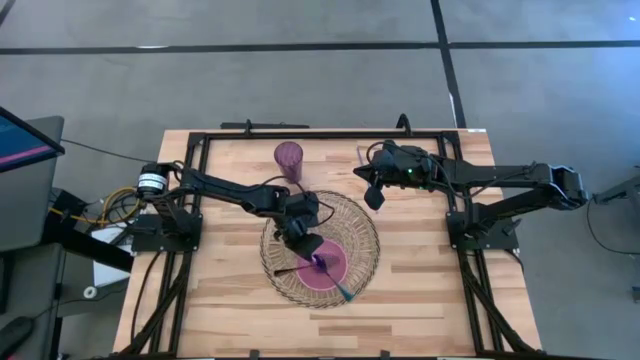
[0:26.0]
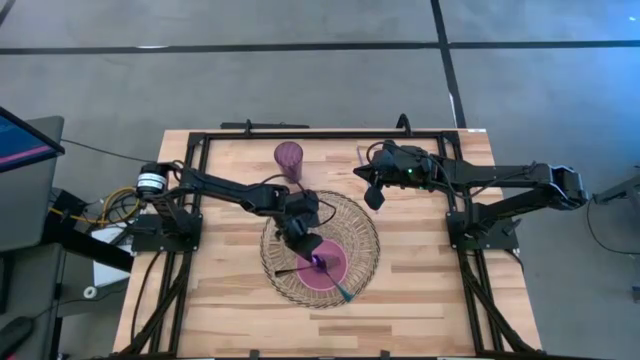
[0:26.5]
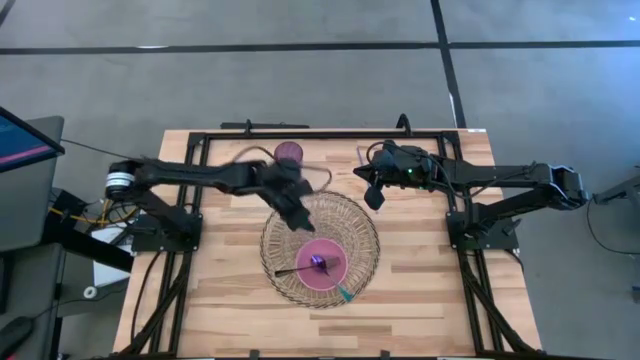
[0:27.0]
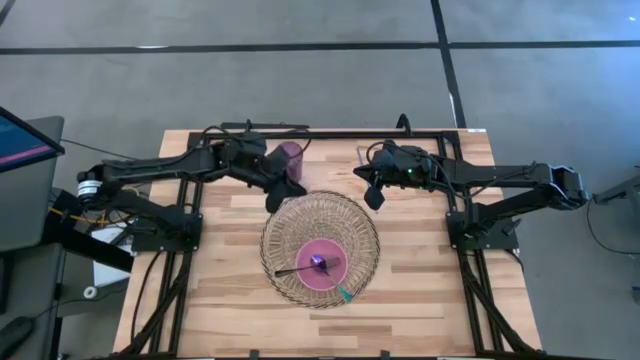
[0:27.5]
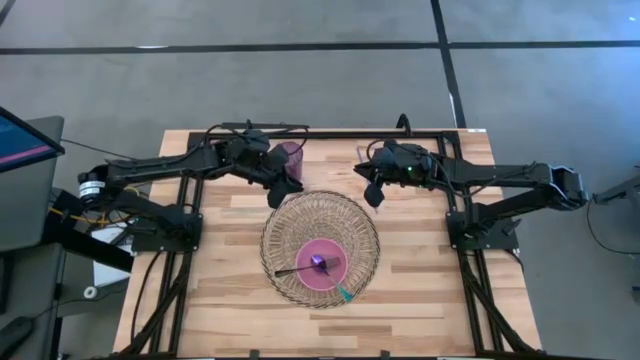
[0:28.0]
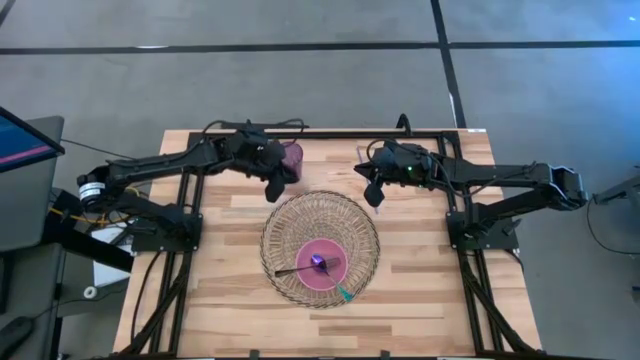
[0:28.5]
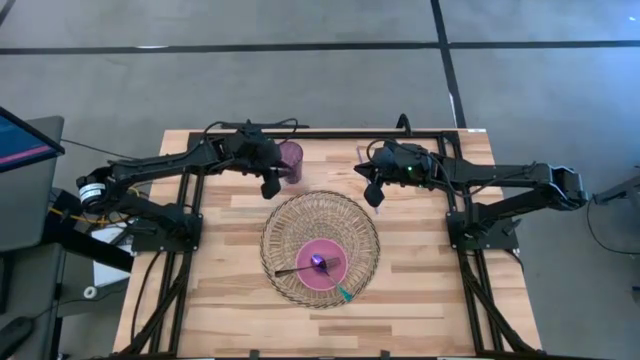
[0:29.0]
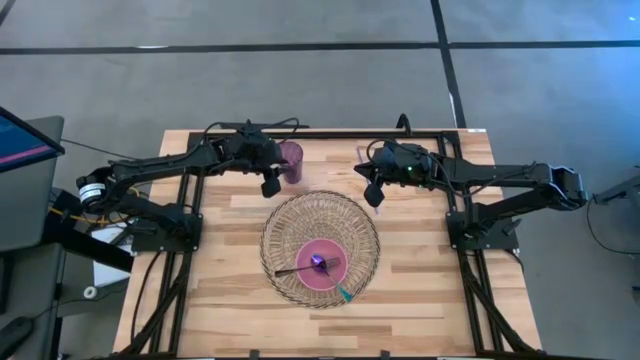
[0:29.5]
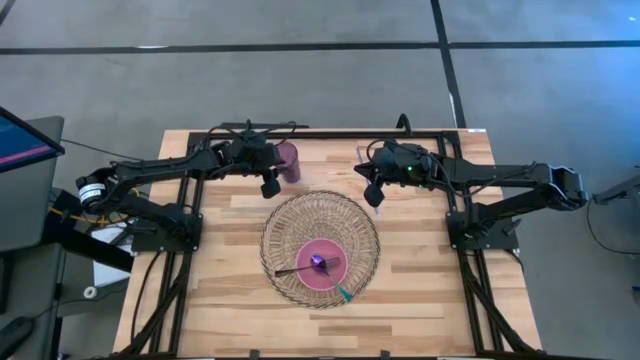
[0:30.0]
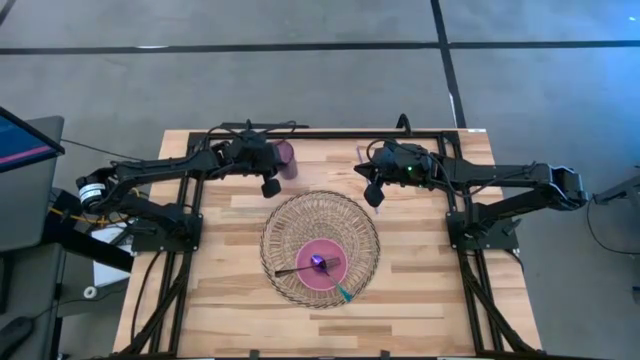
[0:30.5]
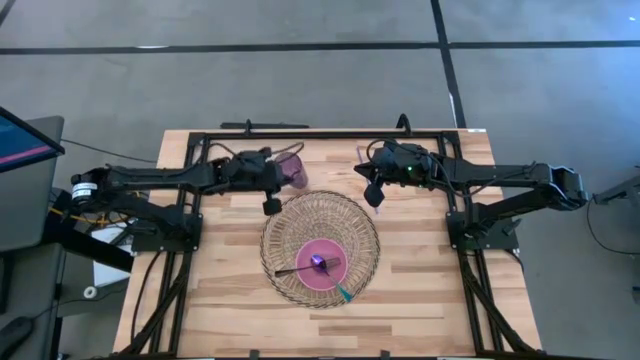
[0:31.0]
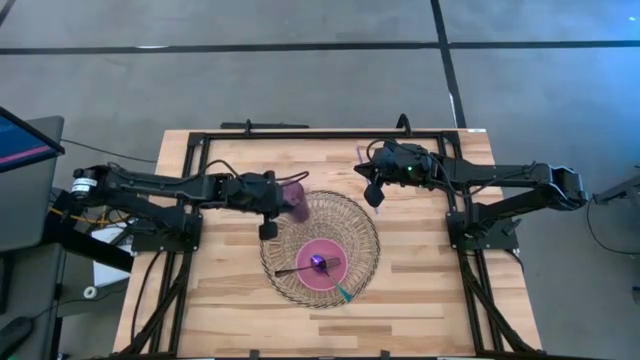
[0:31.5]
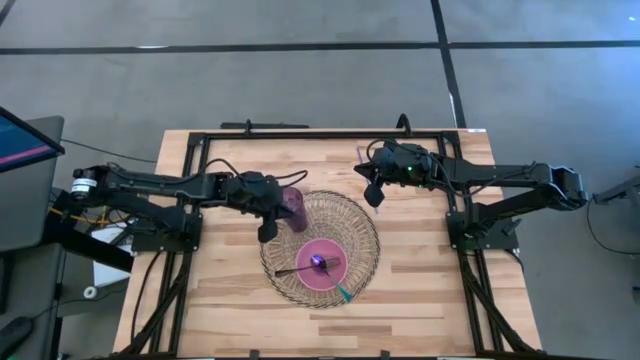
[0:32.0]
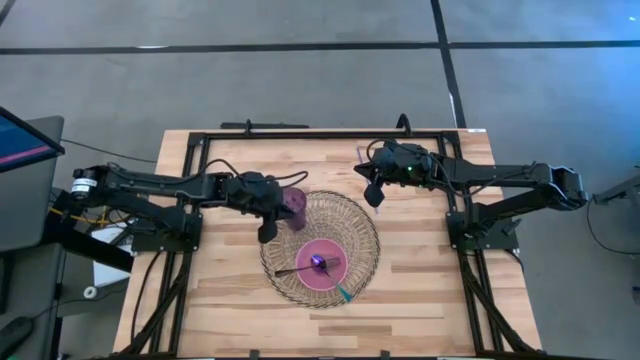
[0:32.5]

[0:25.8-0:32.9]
Task: Pick & Place Utensil
Put the violet cup on the brown mat to the top left of the pink bowl

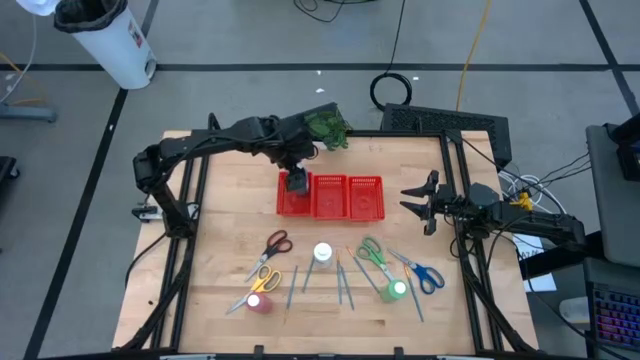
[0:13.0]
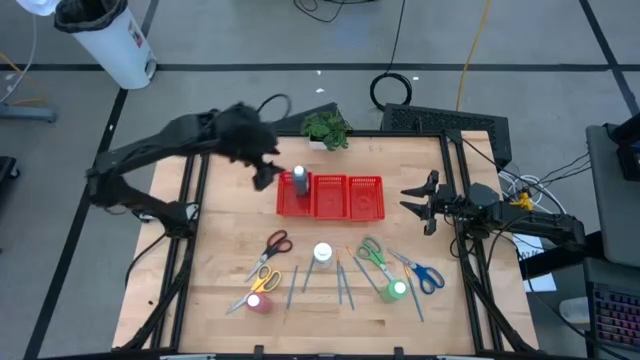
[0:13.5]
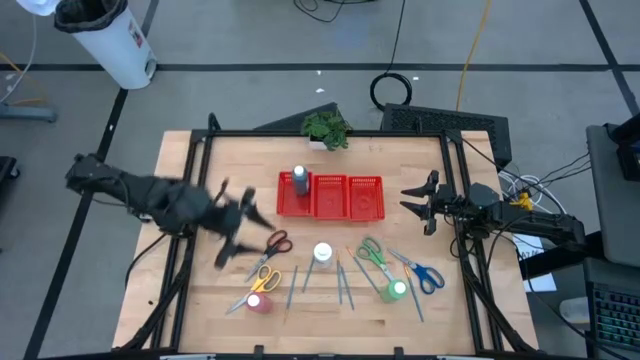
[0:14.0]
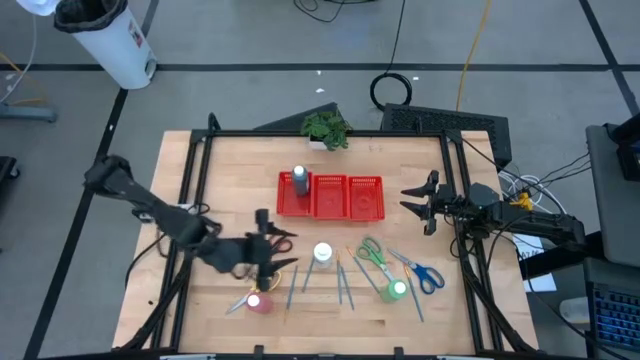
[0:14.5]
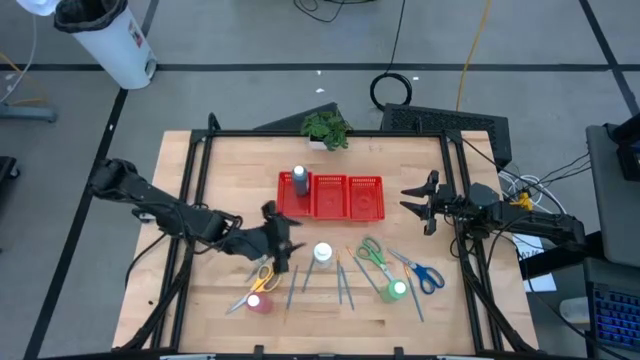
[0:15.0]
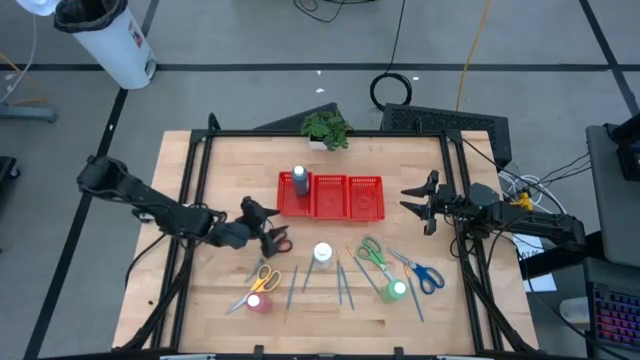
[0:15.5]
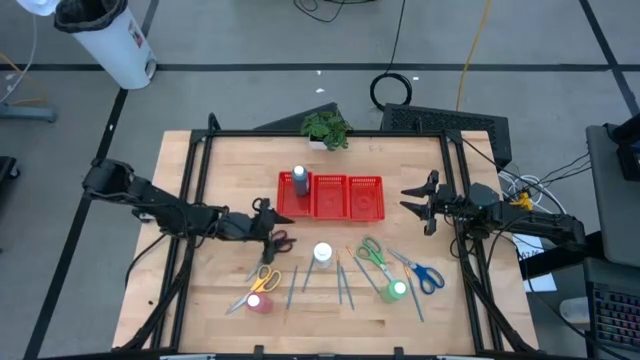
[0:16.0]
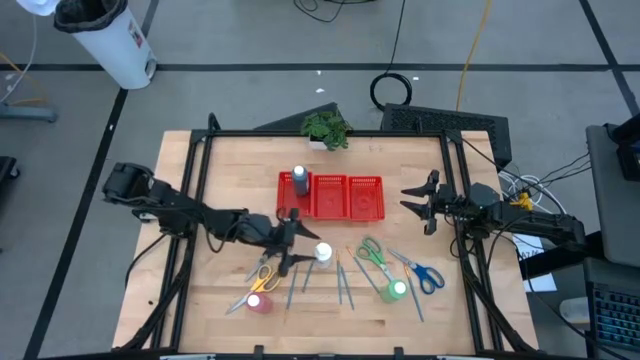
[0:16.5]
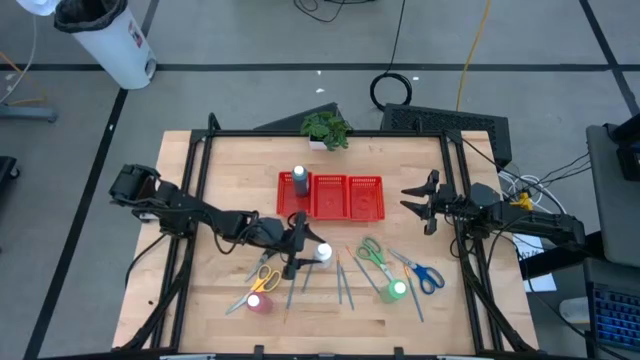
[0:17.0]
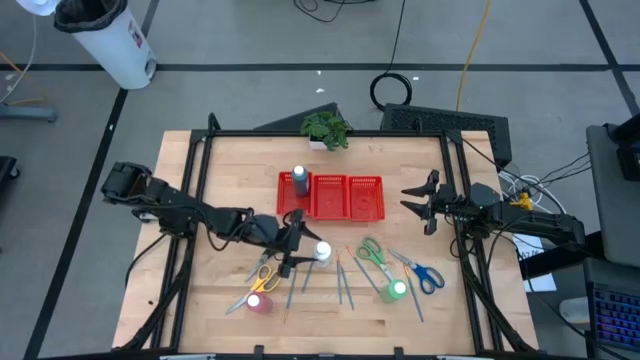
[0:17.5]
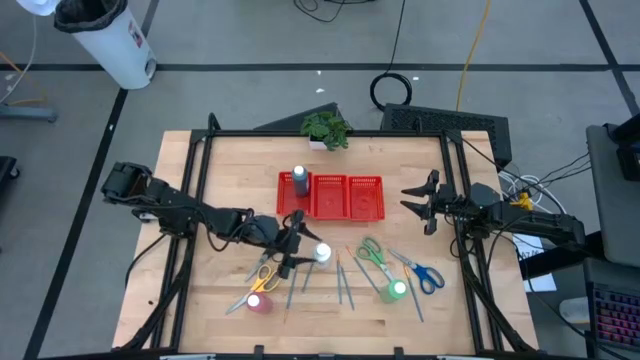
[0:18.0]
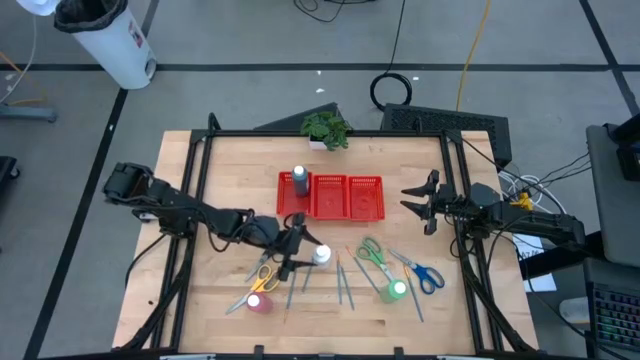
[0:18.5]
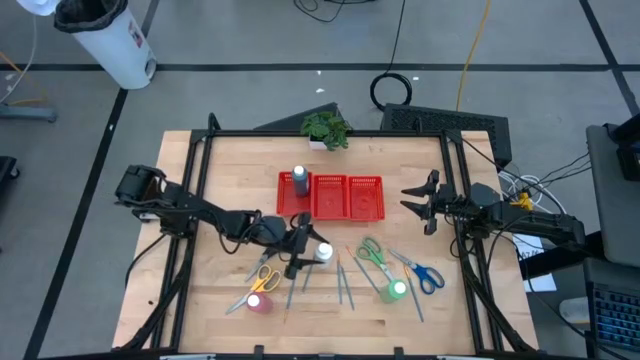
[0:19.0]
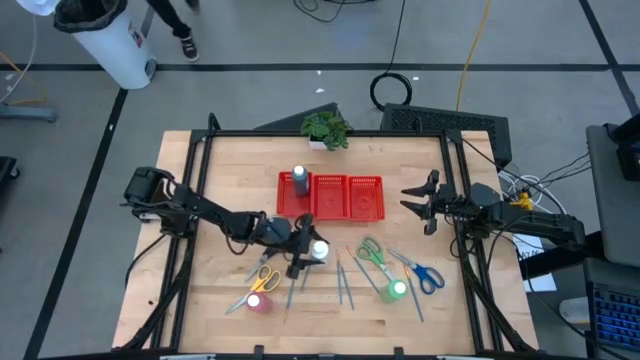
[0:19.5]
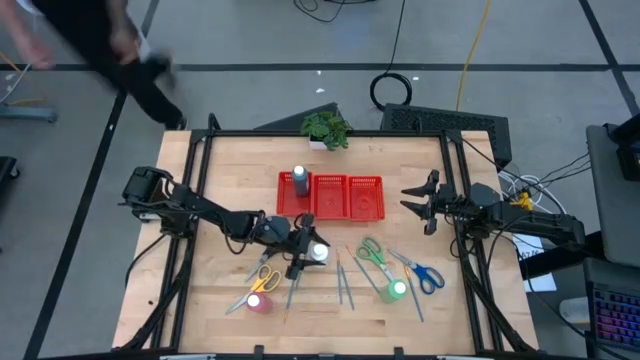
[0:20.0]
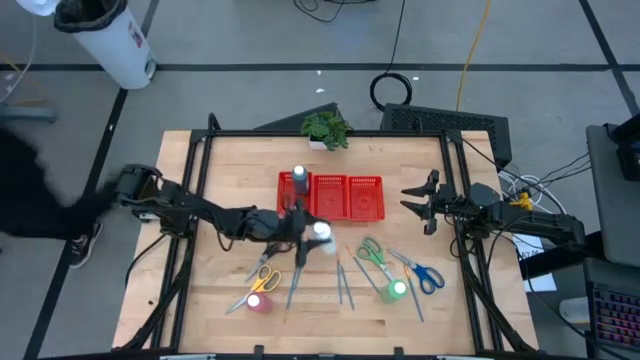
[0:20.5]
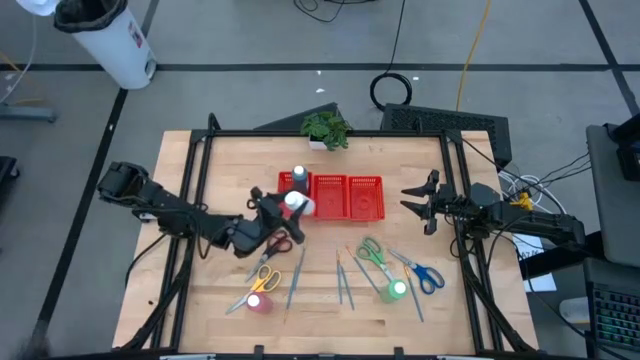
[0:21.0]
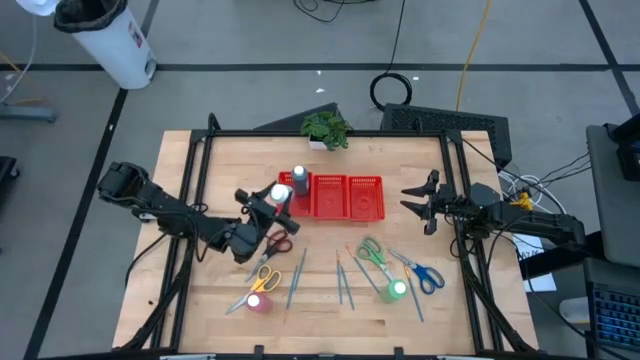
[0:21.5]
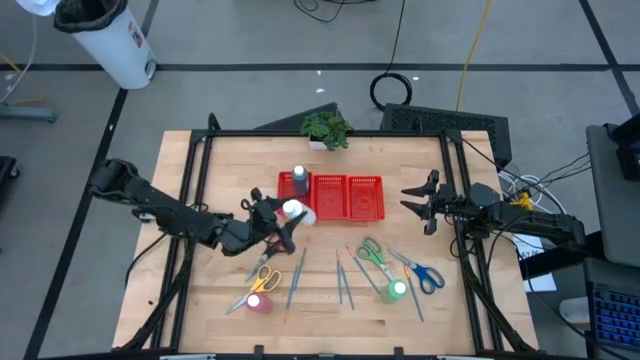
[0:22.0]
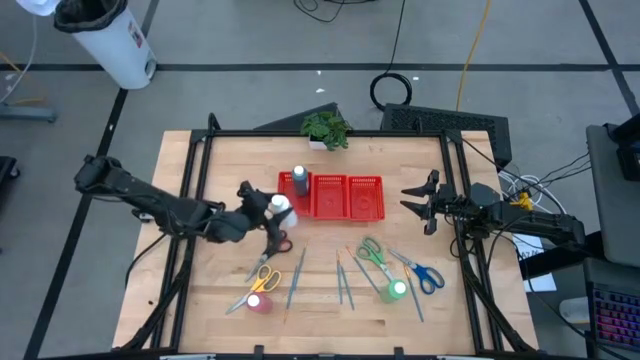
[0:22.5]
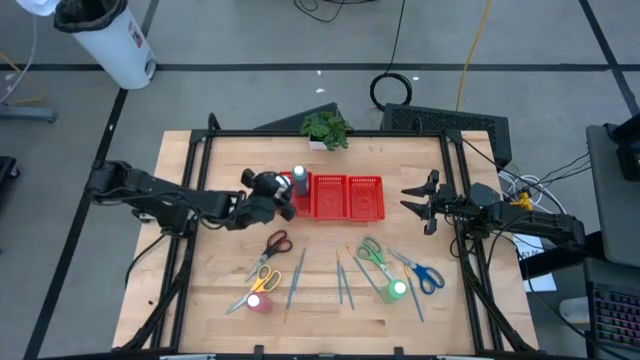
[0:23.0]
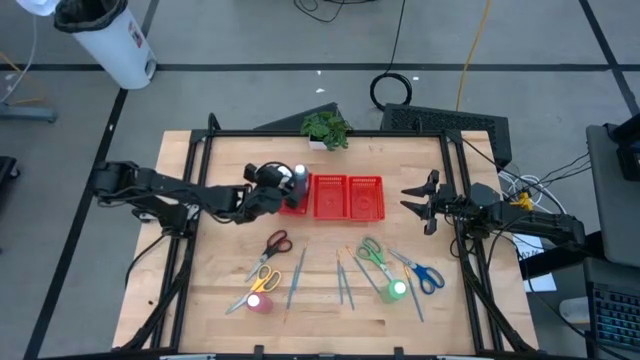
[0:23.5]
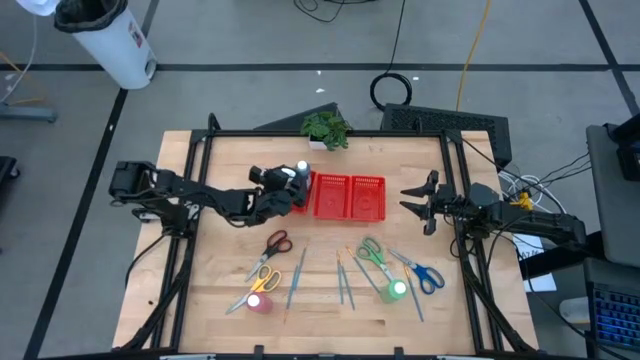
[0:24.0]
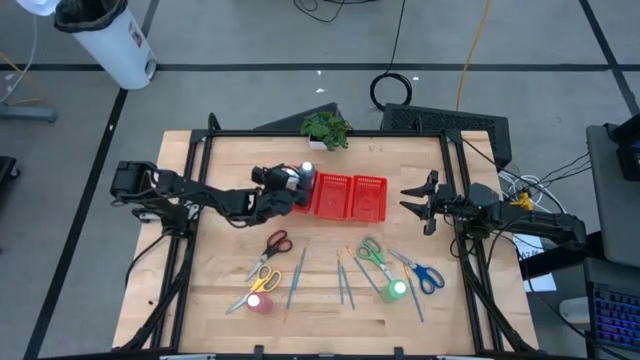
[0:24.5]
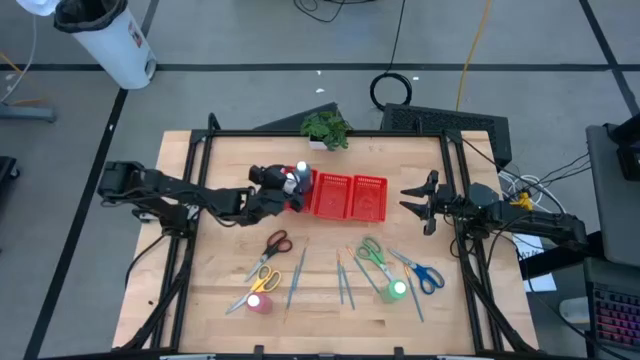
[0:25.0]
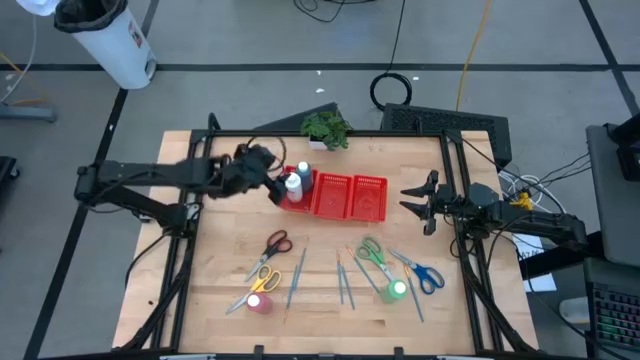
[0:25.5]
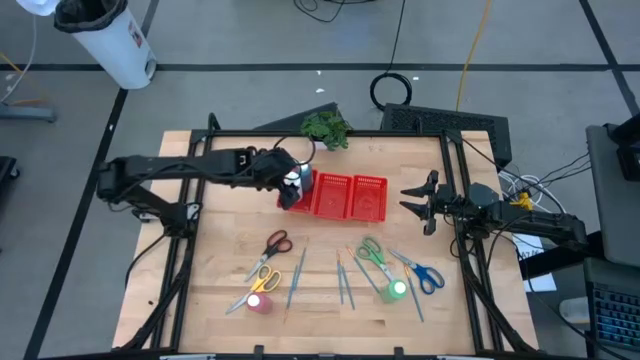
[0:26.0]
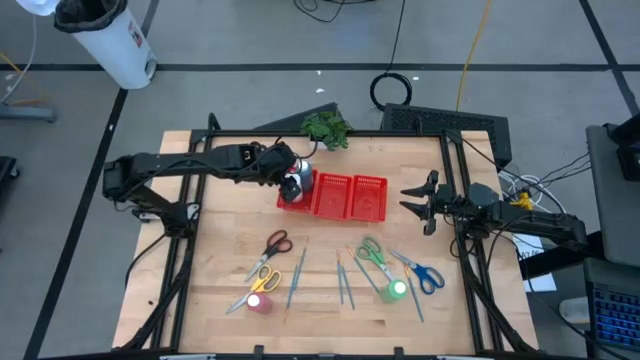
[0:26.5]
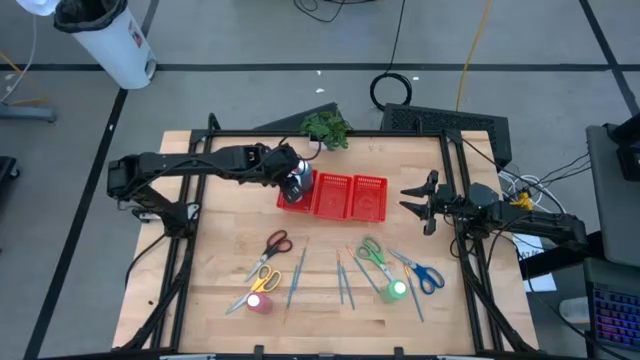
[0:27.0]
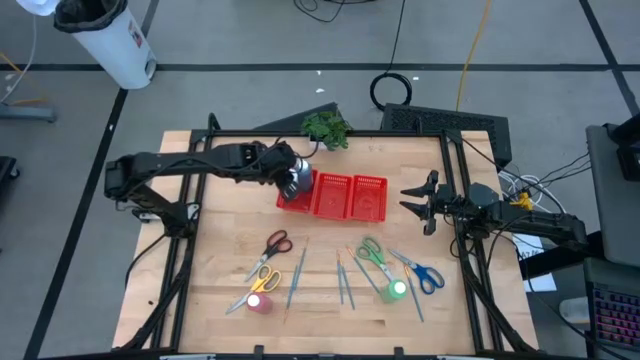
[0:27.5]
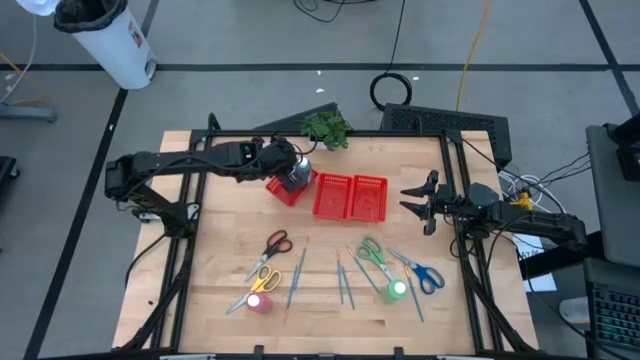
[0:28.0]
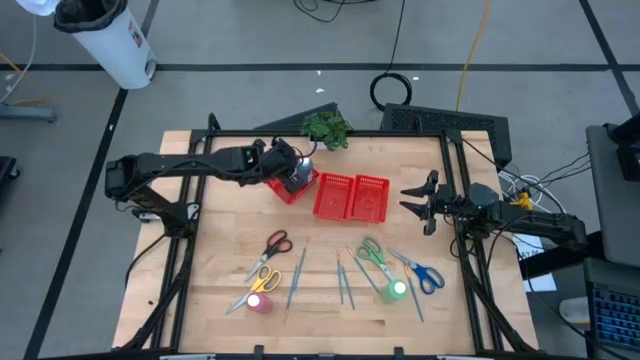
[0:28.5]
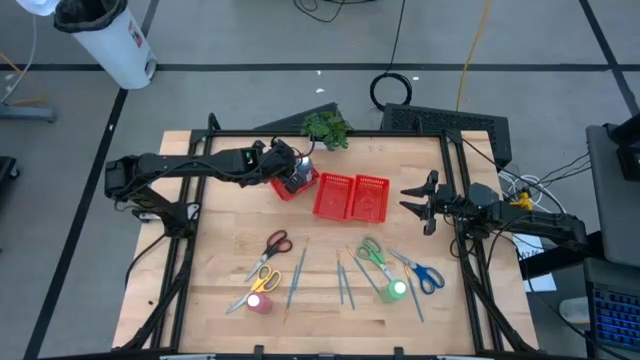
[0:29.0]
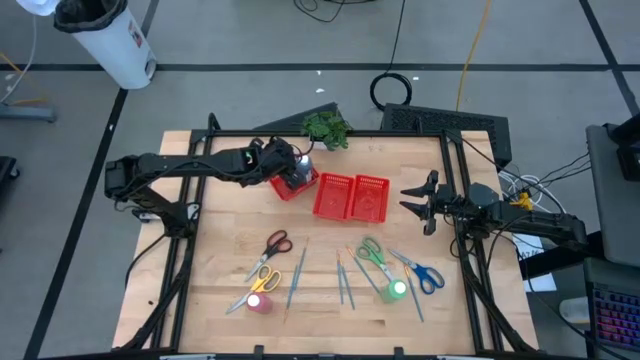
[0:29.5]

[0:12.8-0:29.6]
Task: Pick & Place Paint Supplies
Put the white paint bottle into the left red bin
